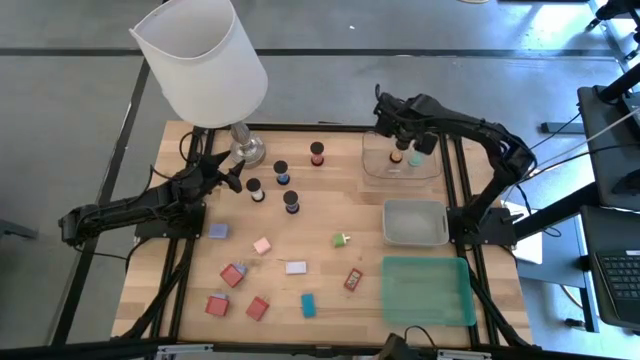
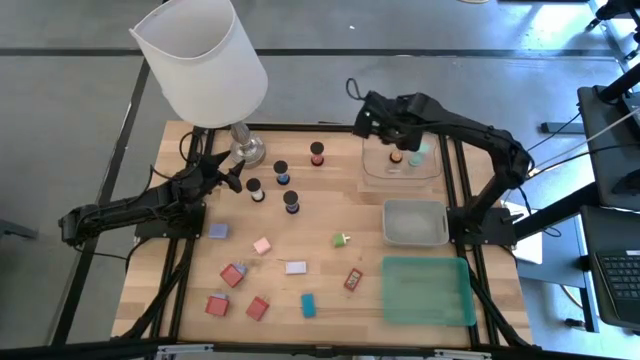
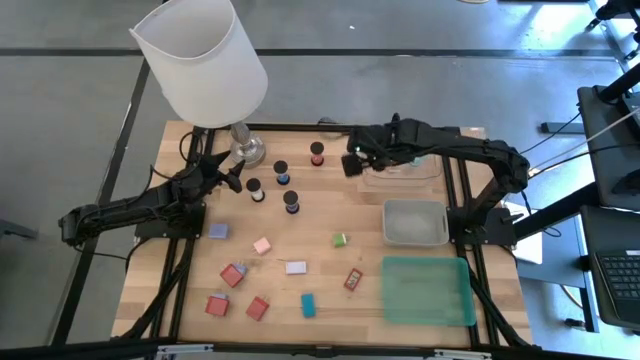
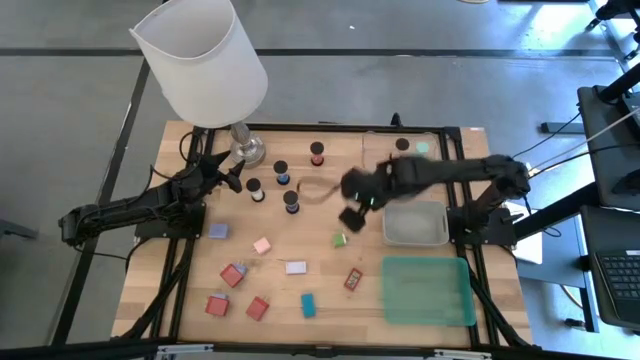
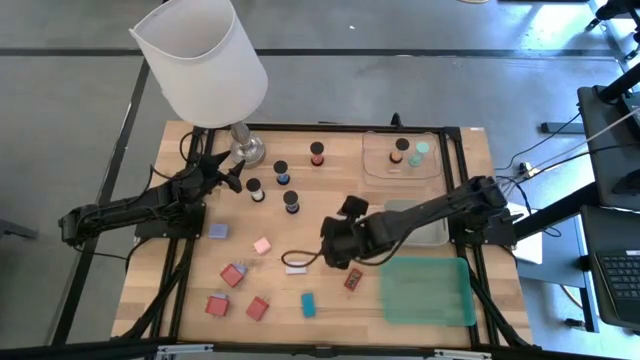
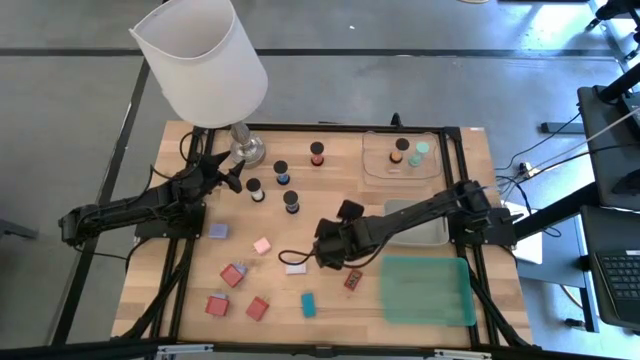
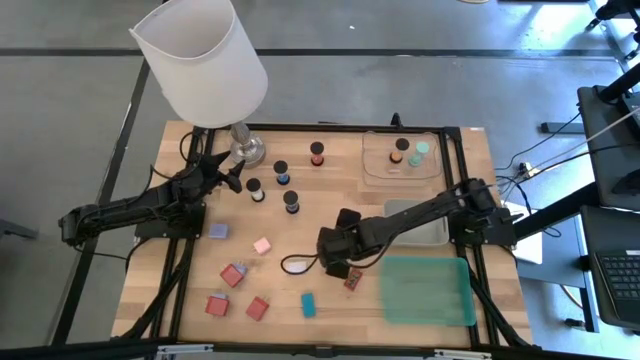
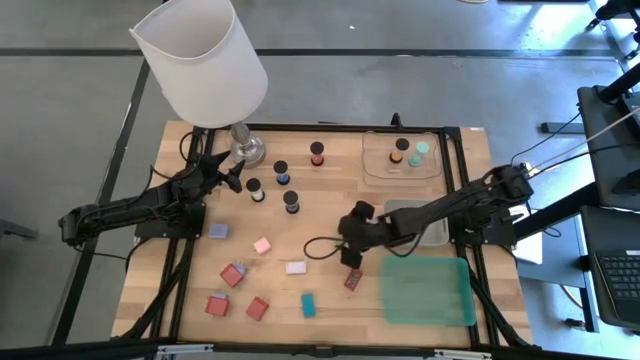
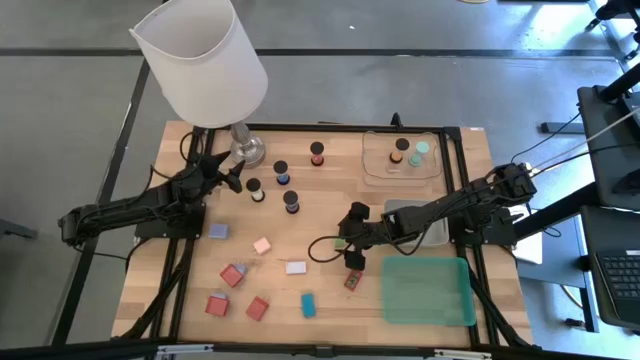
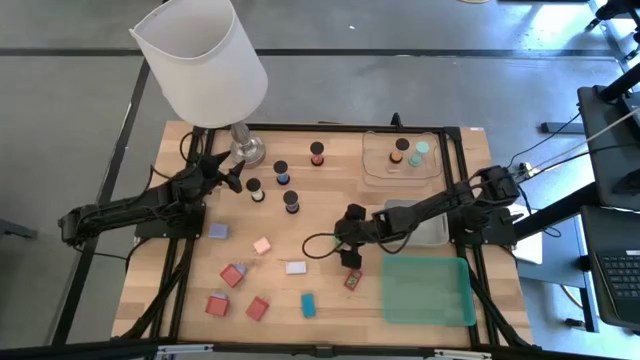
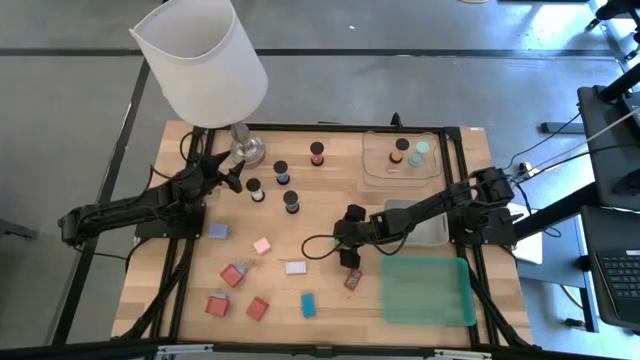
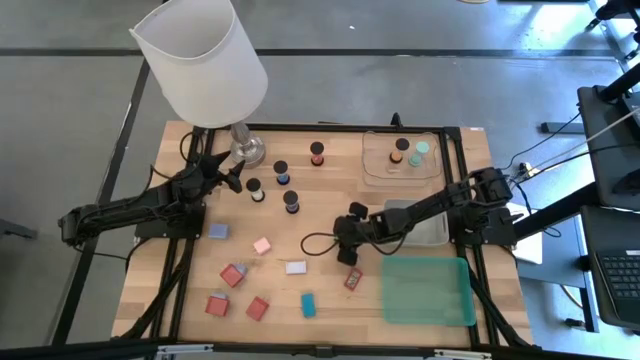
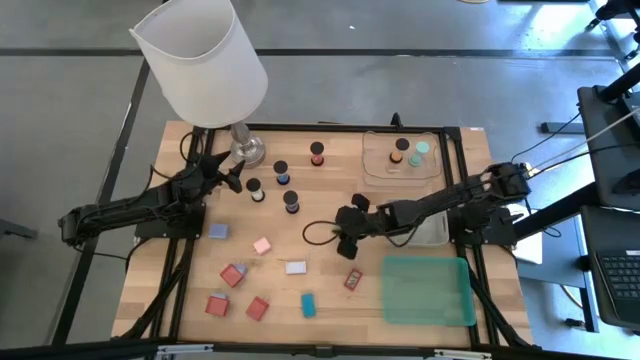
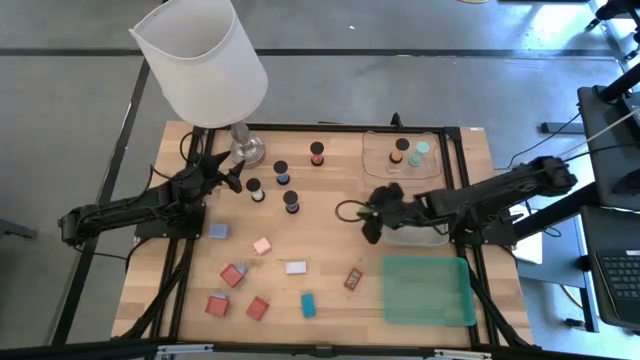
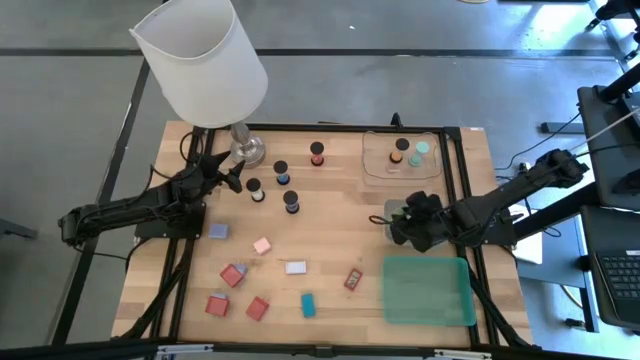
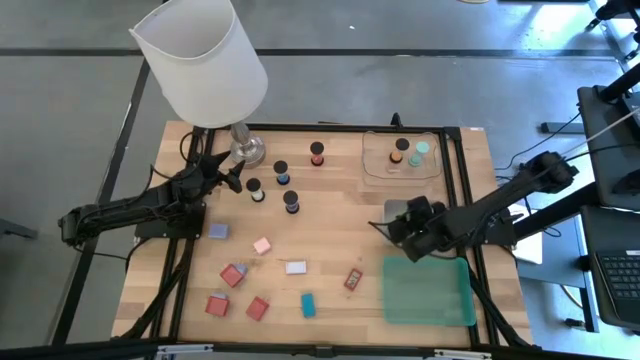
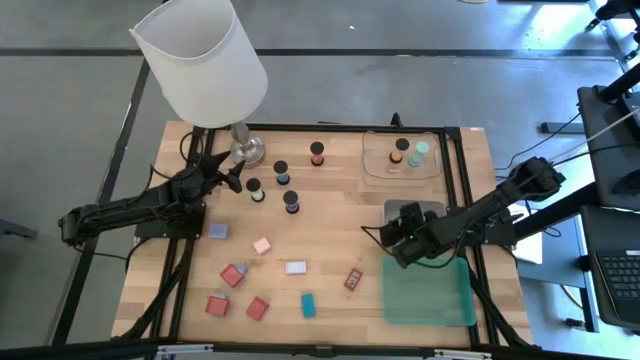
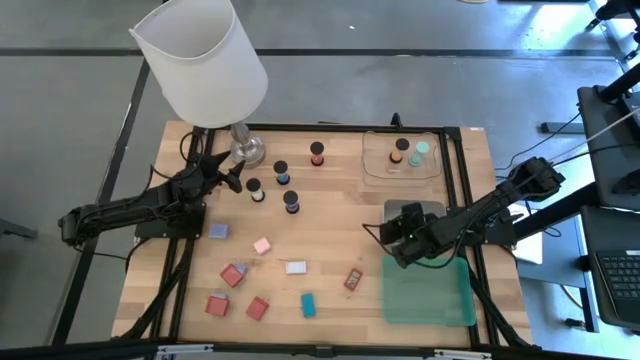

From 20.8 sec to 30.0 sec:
Task: Pick & Place Office items
Put the green charger adapter into the white bin

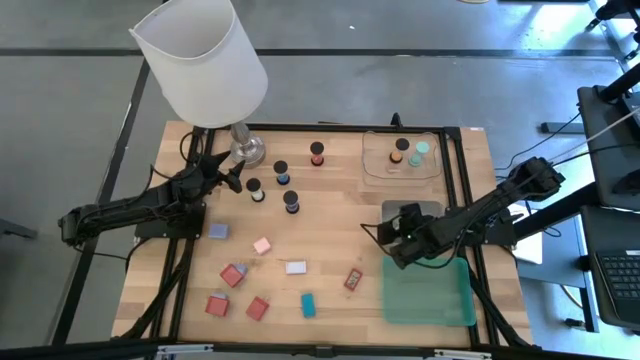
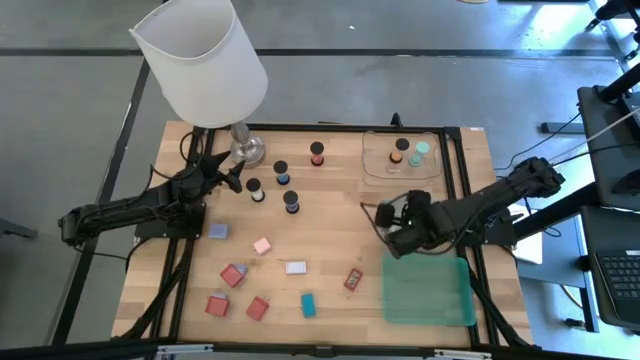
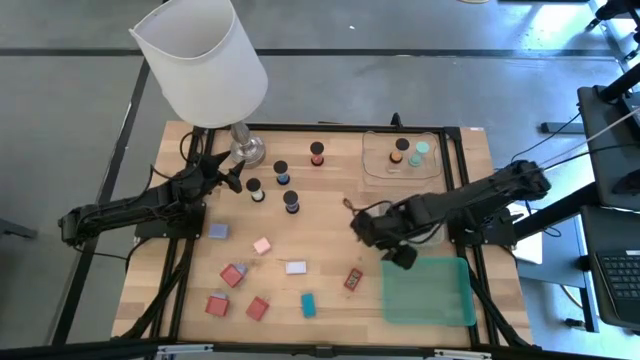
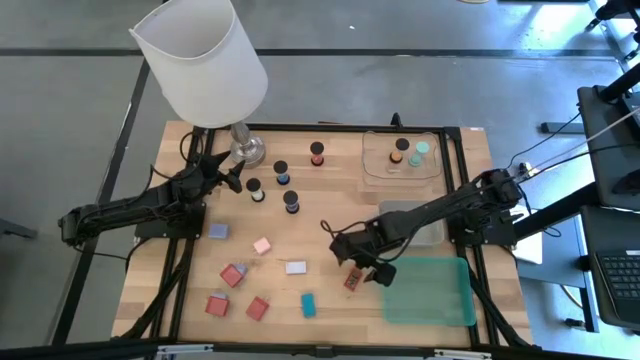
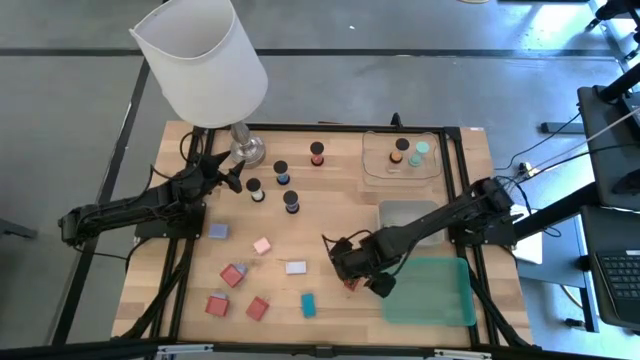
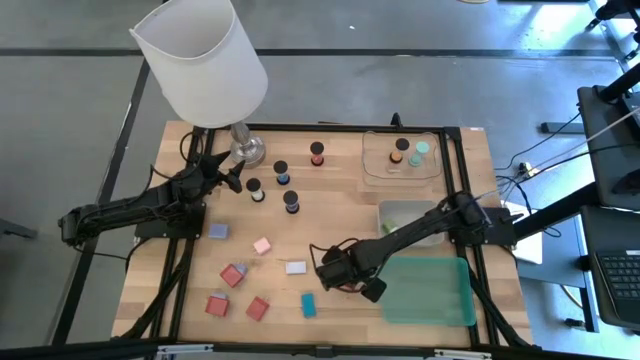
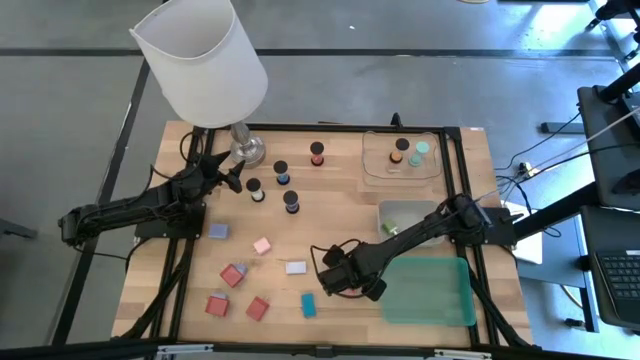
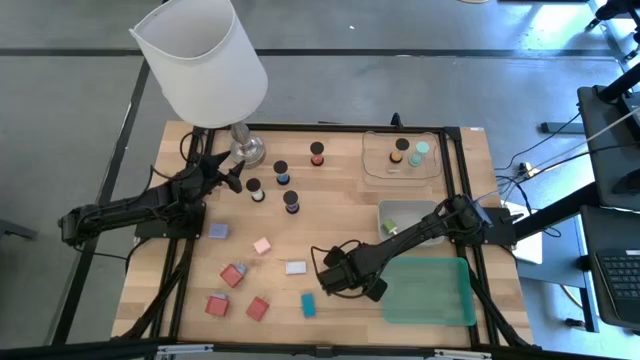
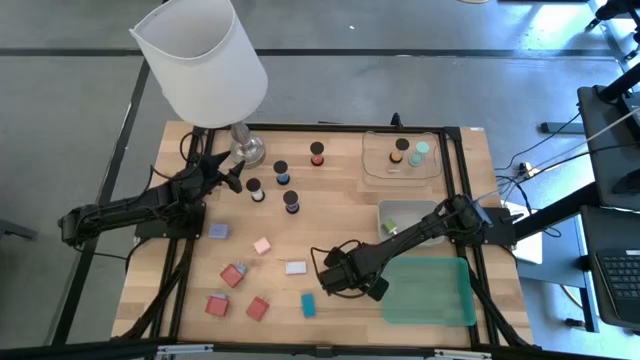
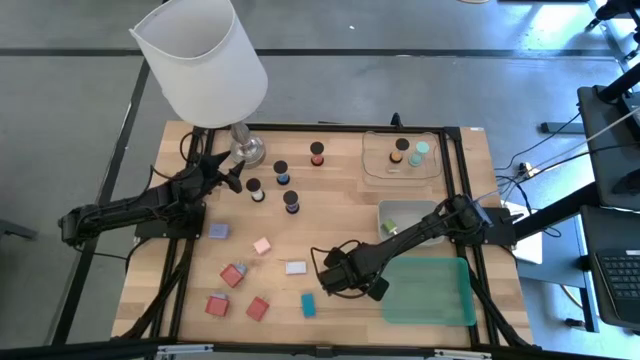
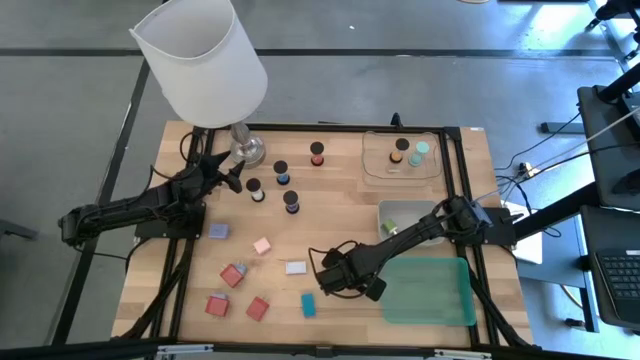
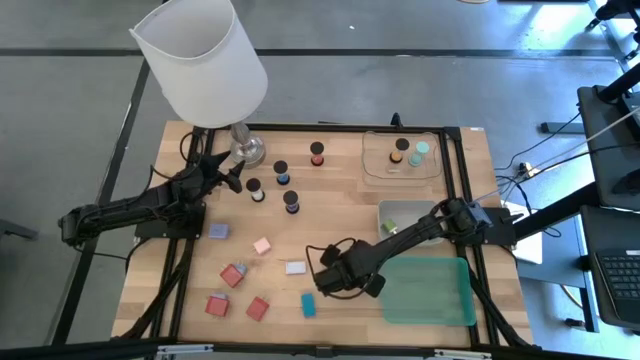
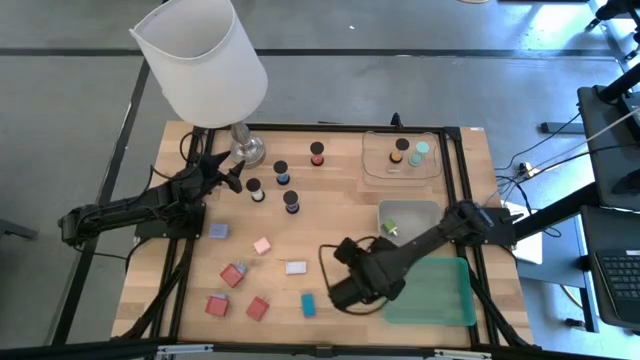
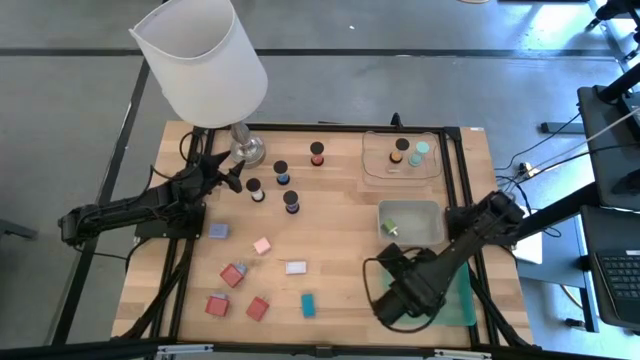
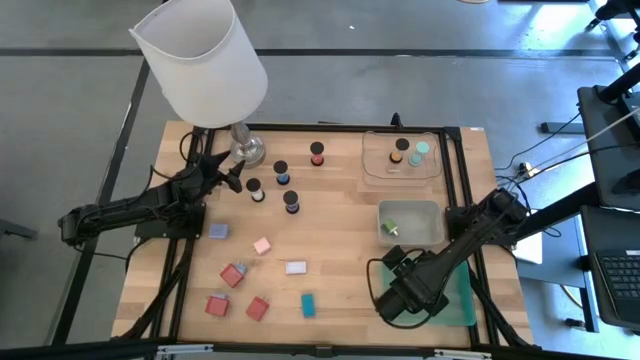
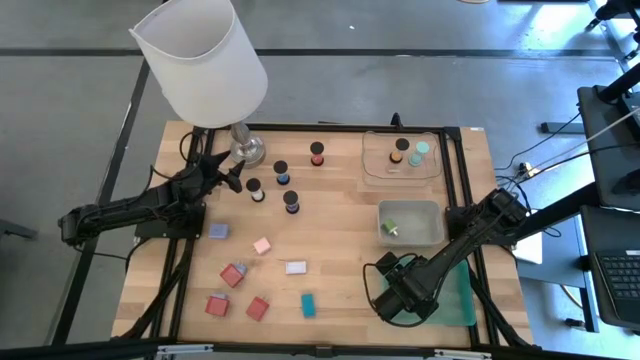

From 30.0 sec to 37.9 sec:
Put the red timer into the green bin

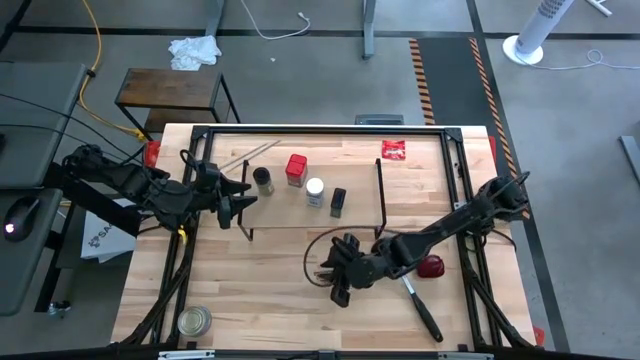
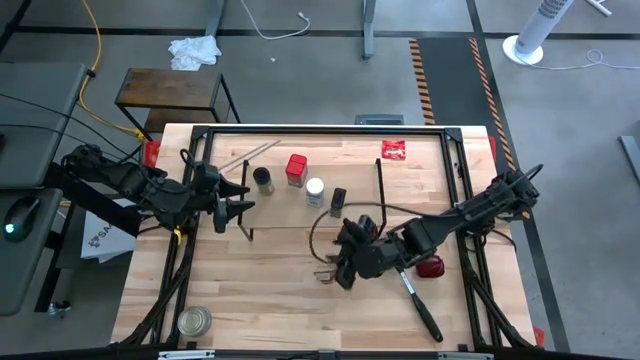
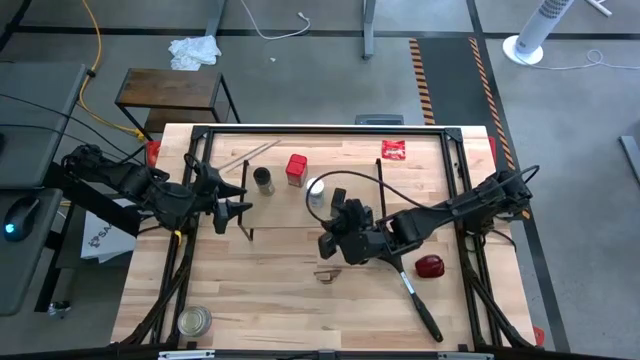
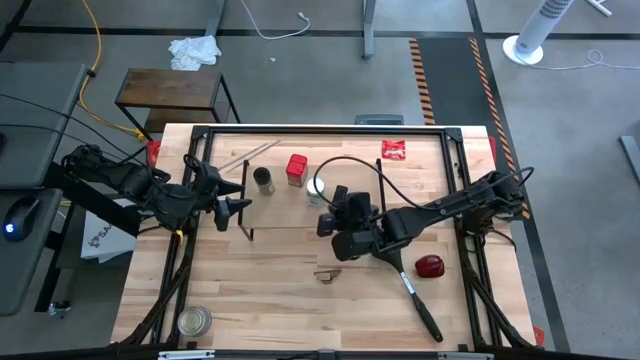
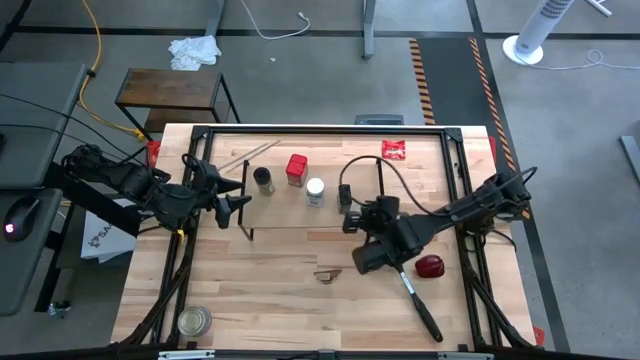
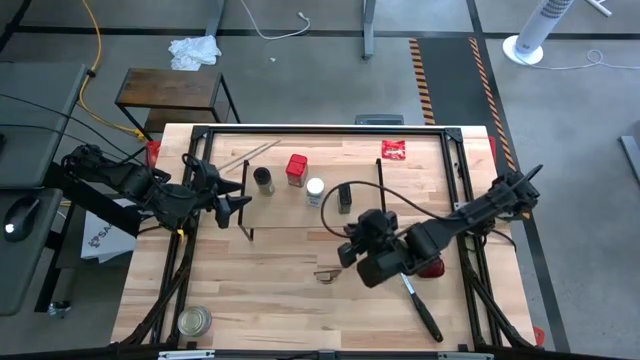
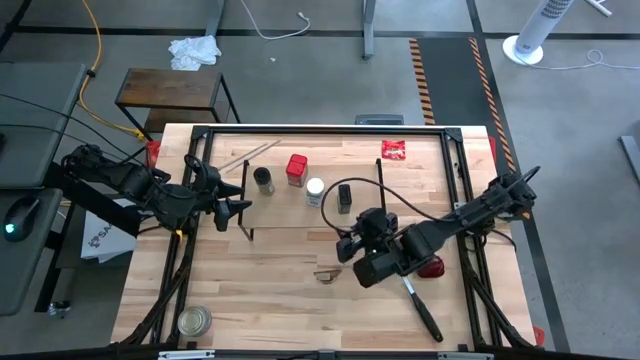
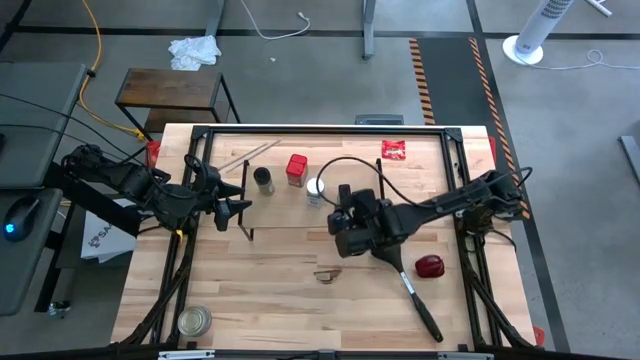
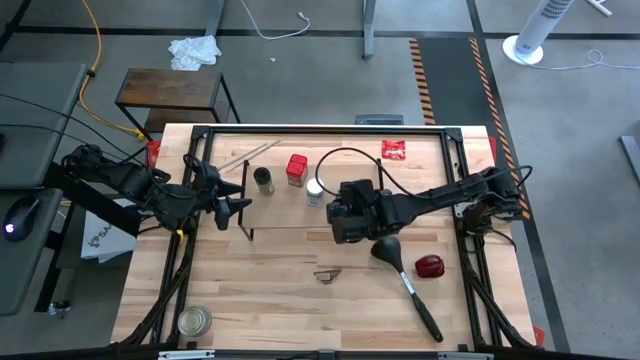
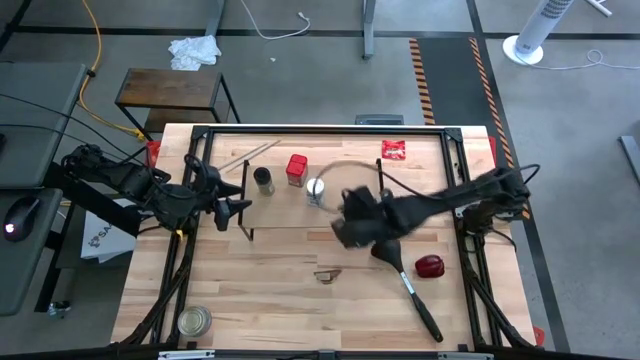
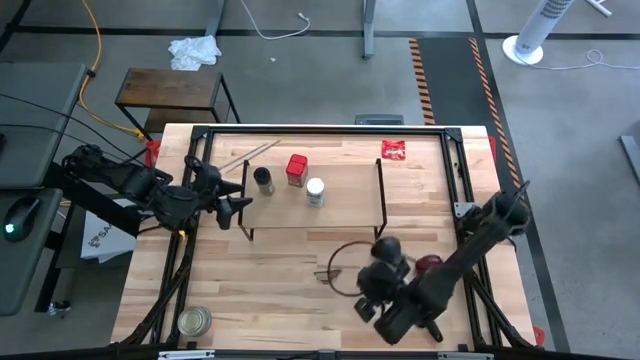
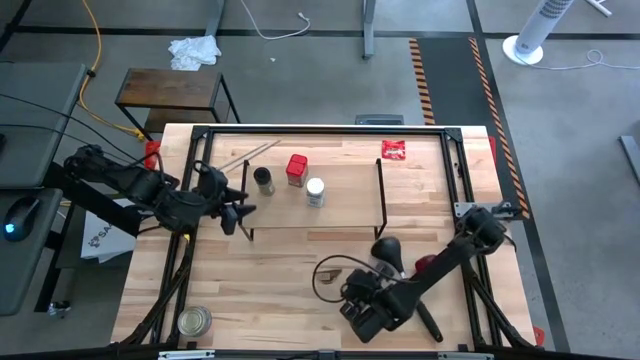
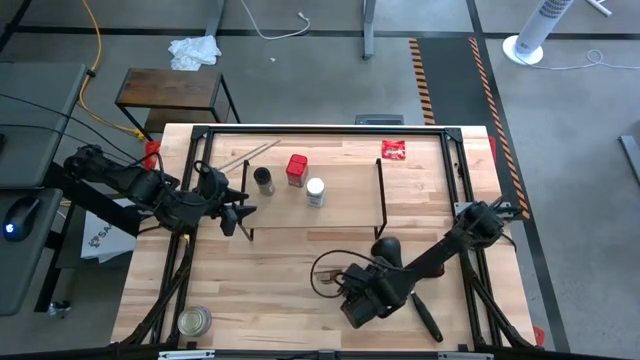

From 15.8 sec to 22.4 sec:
Task: Shelf spices
Remove the black seasoning can from the shelf
